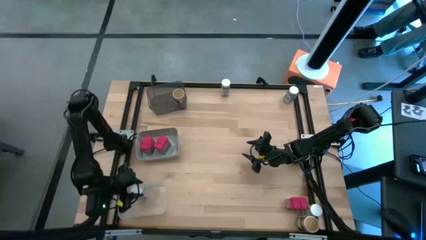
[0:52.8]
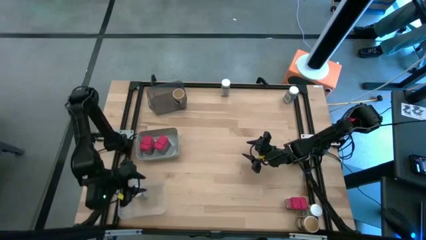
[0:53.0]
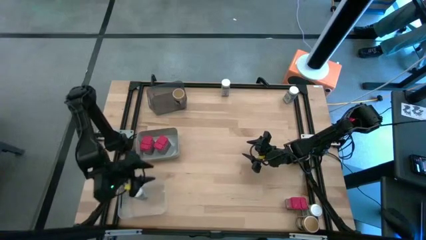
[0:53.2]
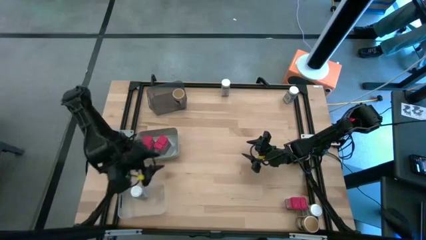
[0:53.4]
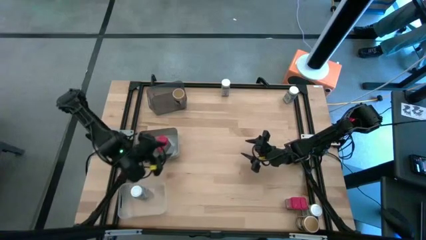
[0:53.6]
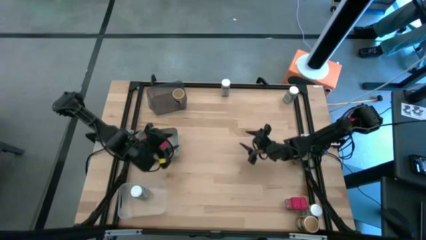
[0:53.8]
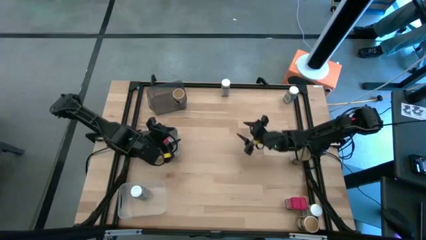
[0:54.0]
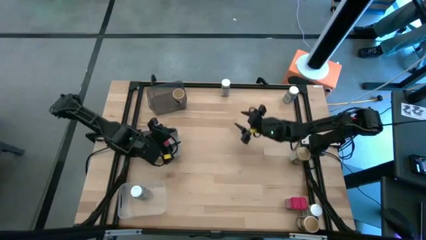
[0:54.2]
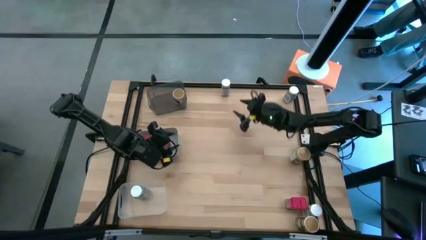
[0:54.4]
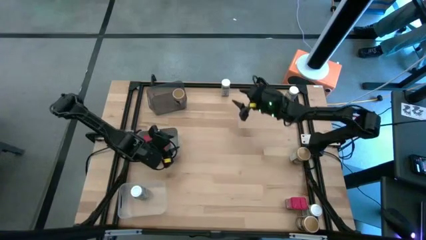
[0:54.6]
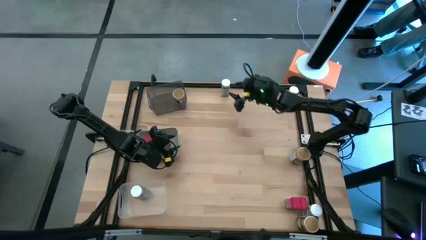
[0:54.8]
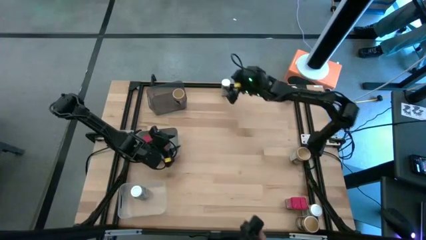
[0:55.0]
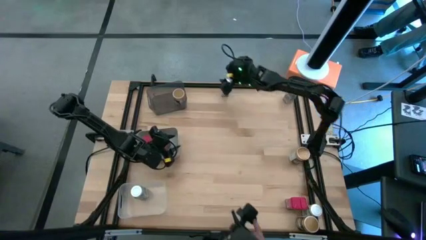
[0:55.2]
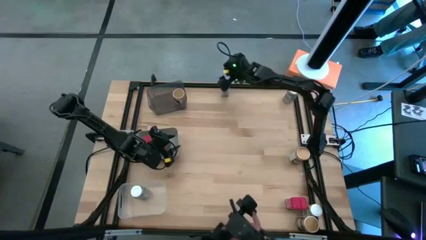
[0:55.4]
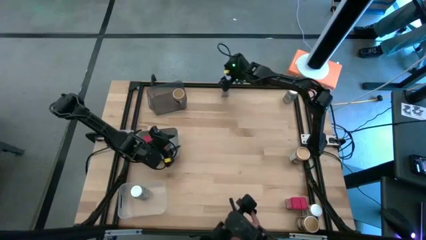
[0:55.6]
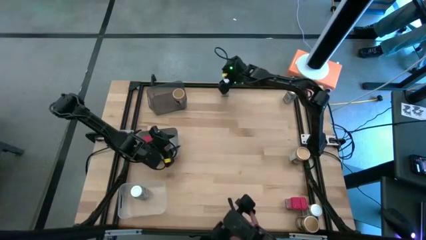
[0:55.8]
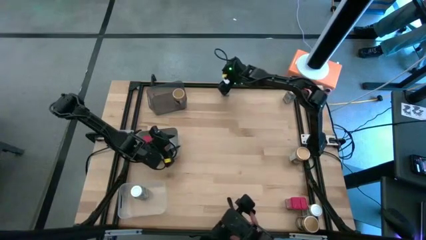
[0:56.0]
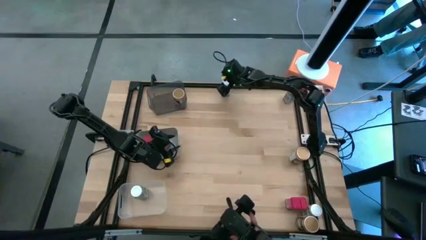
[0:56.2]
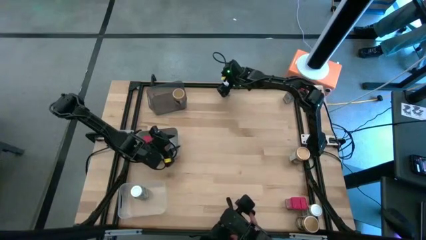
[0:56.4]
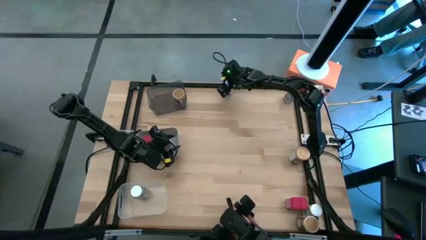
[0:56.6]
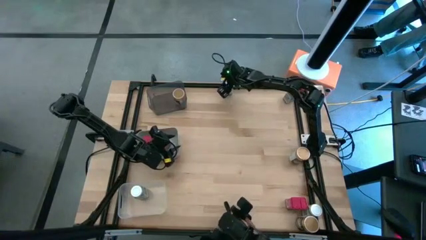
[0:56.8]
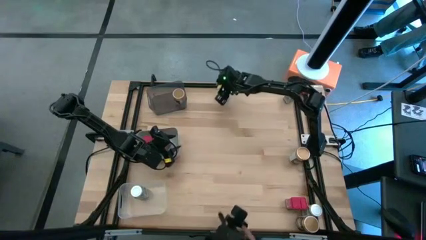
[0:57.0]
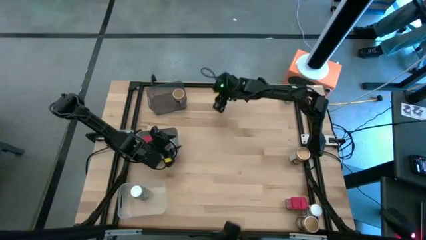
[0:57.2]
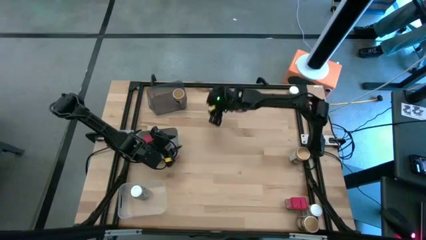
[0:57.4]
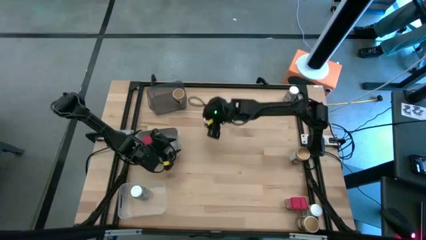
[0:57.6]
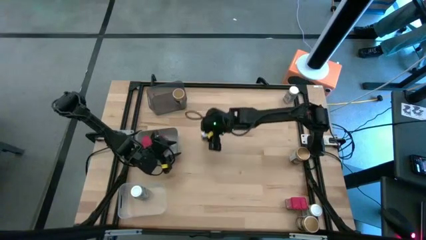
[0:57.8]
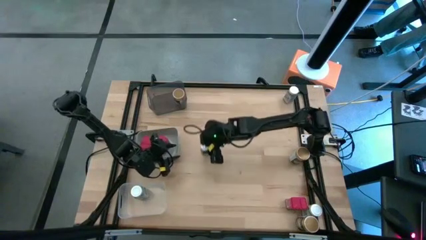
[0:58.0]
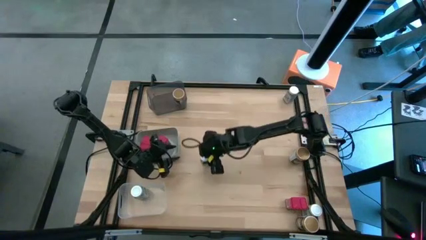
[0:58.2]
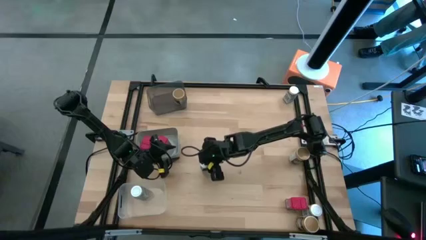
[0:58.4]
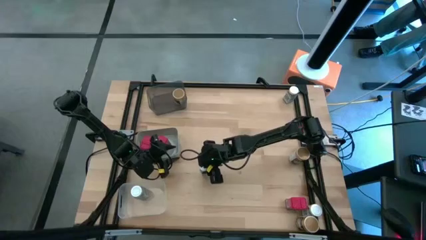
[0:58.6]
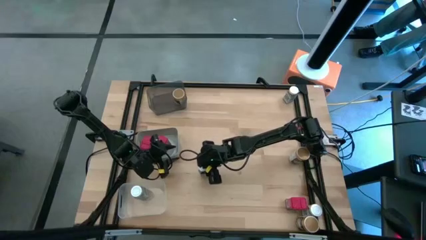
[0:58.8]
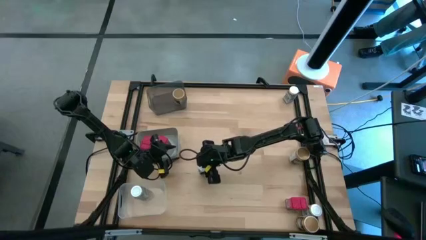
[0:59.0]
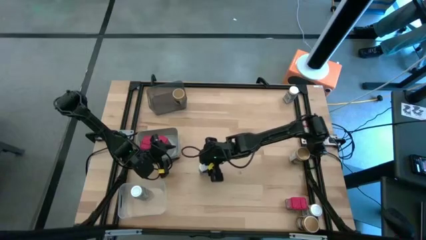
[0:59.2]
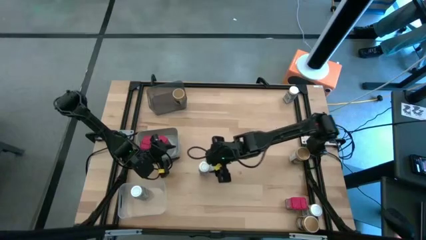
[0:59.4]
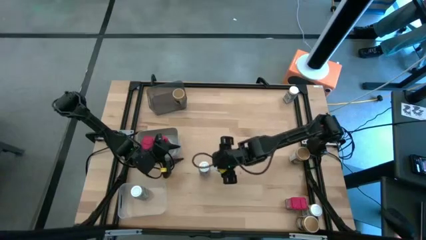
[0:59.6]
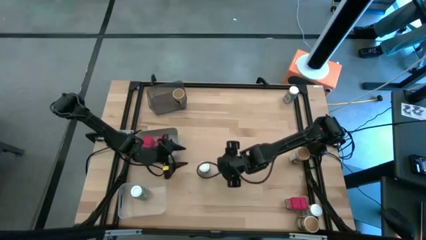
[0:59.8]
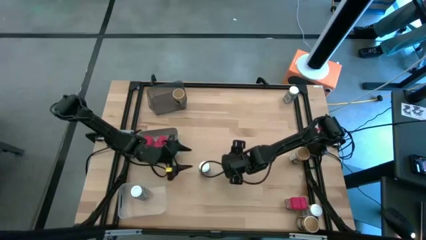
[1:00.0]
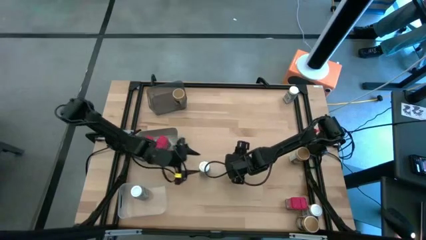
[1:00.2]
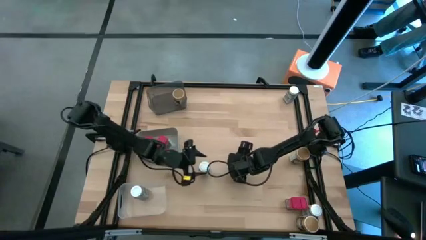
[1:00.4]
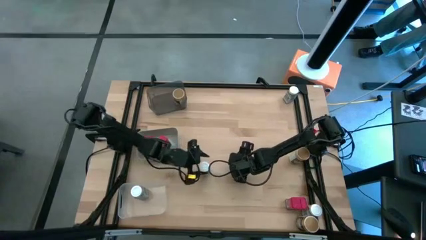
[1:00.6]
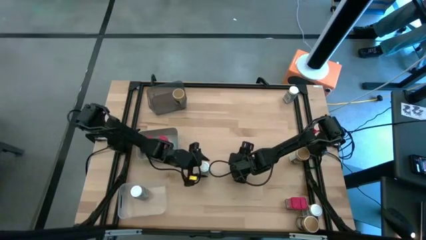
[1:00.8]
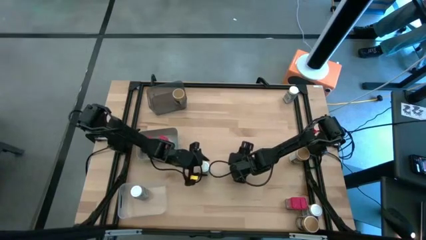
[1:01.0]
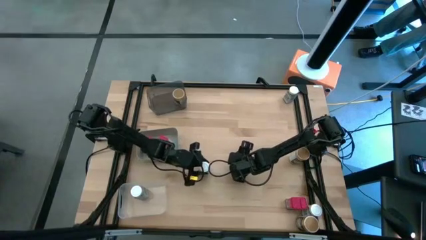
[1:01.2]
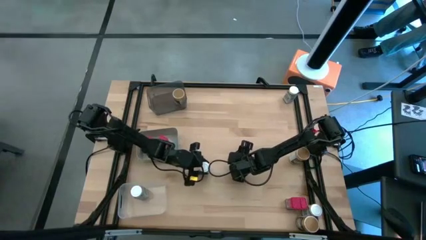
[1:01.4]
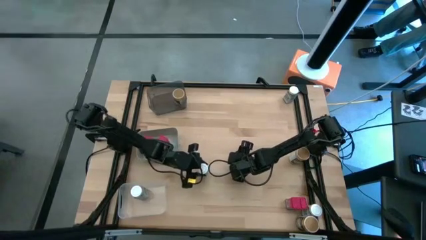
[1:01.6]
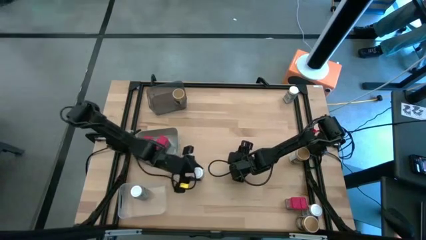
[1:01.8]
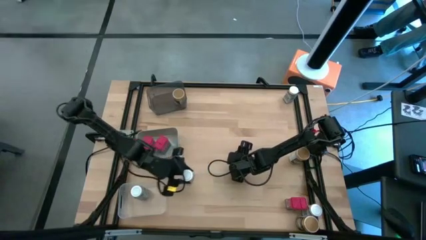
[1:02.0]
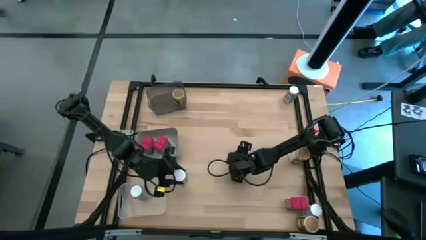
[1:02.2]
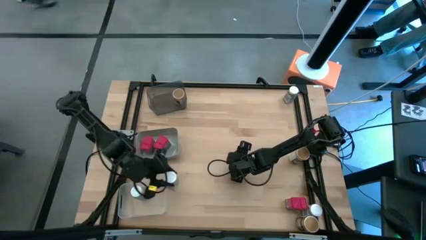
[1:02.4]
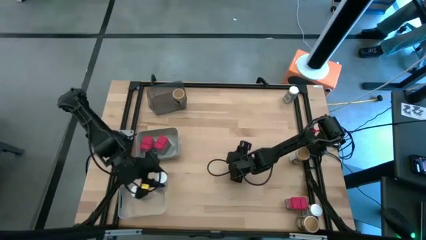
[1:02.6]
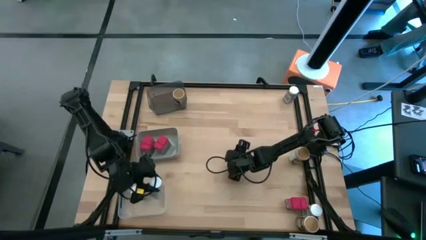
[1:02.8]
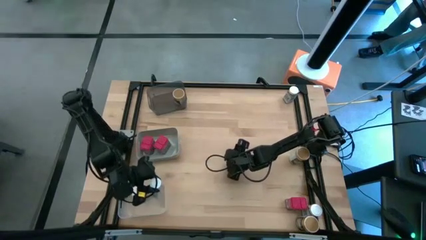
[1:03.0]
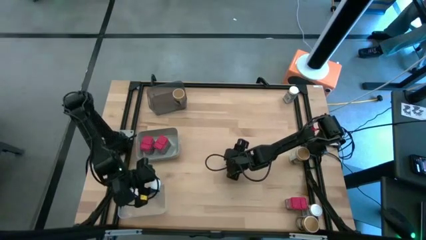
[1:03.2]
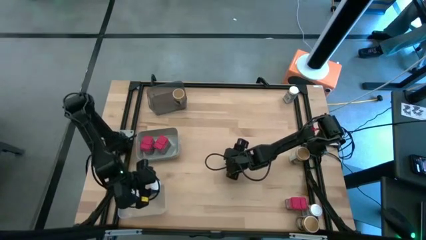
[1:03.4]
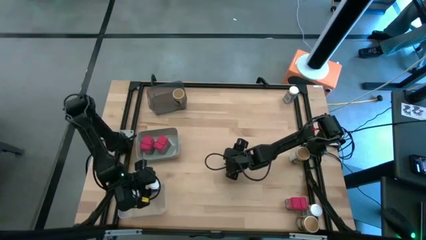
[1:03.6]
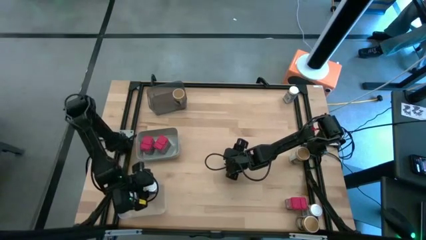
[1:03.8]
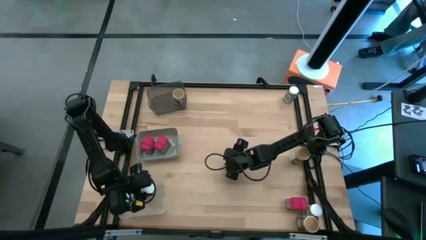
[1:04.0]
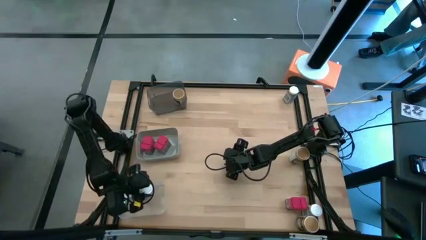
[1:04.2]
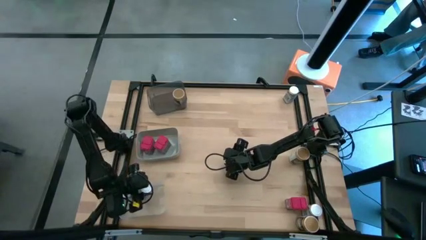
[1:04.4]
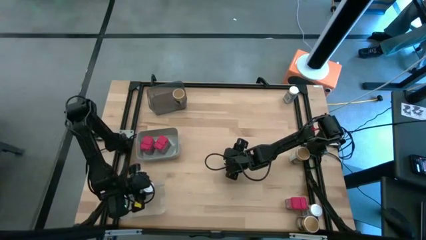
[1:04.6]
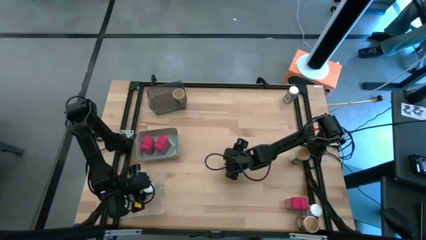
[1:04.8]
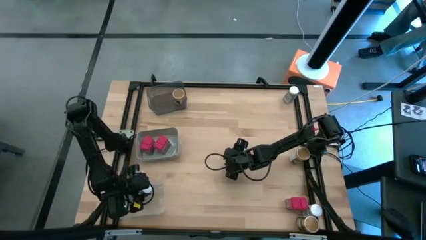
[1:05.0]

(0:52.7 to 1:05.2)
Task: Sort spices by type
Put the top left white seasoning bottle into the transparent bin

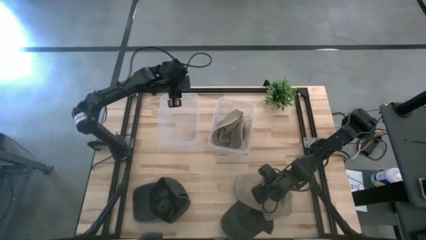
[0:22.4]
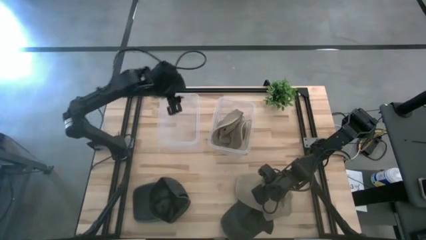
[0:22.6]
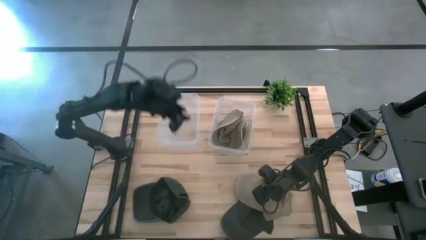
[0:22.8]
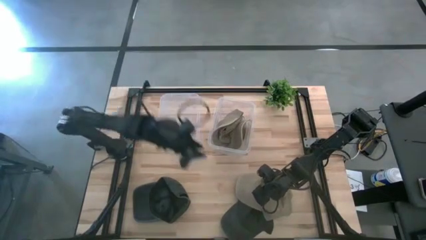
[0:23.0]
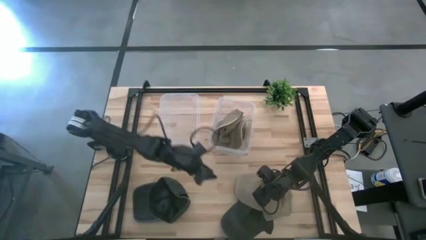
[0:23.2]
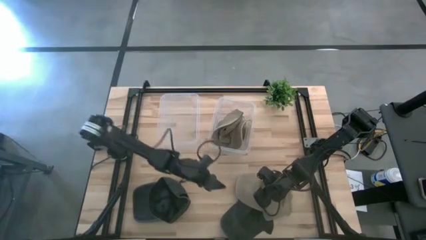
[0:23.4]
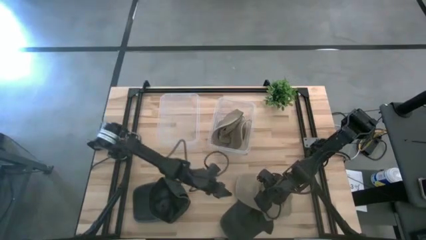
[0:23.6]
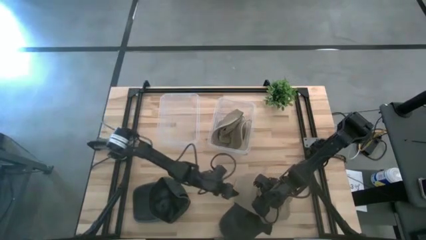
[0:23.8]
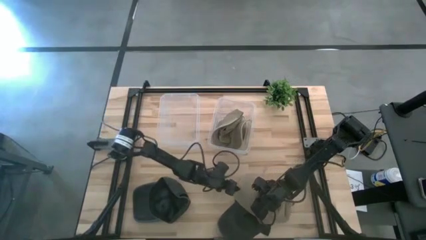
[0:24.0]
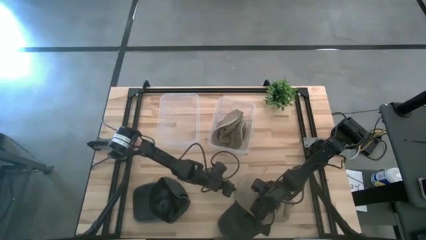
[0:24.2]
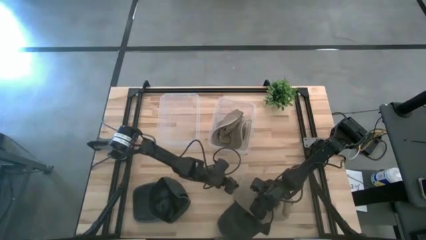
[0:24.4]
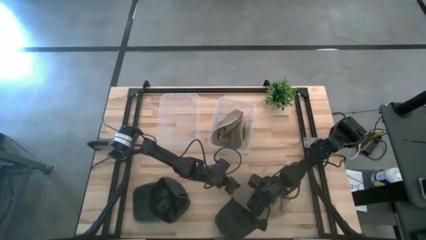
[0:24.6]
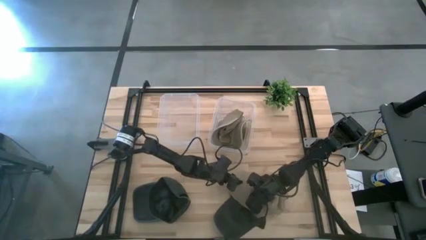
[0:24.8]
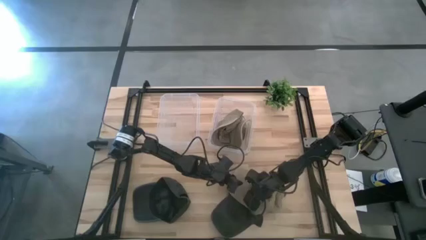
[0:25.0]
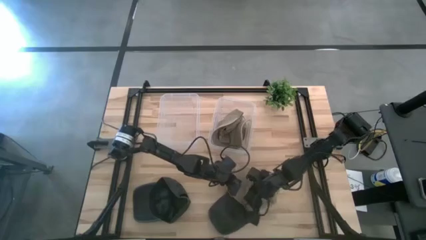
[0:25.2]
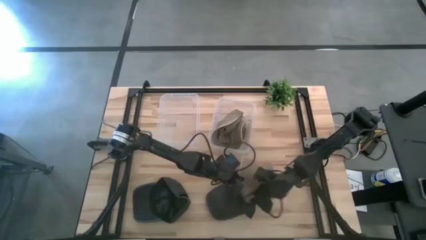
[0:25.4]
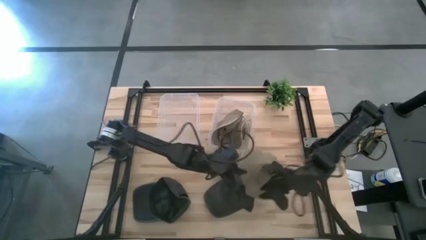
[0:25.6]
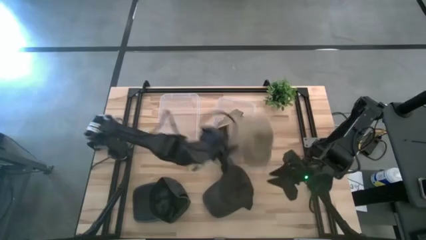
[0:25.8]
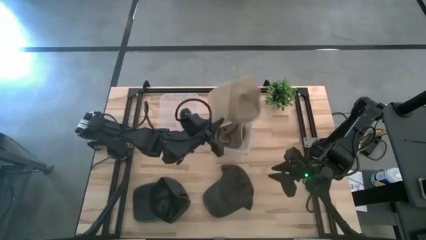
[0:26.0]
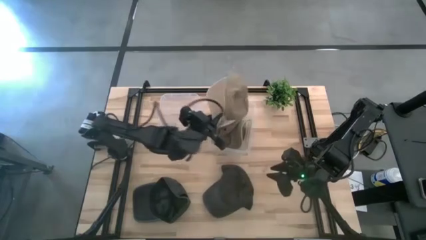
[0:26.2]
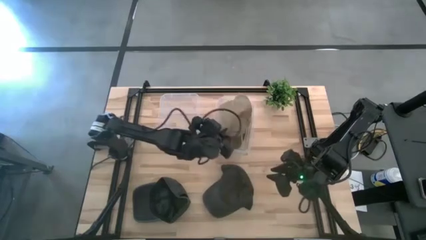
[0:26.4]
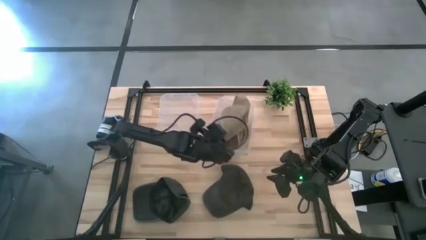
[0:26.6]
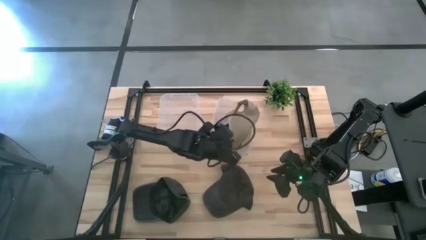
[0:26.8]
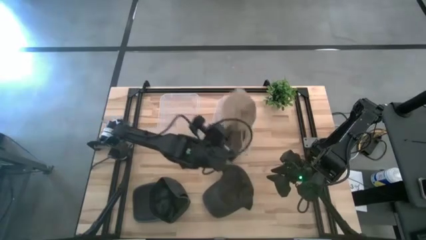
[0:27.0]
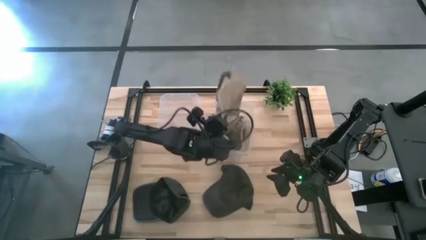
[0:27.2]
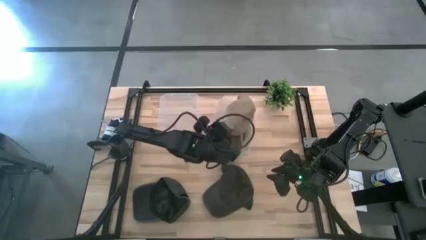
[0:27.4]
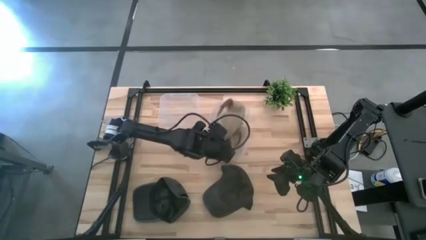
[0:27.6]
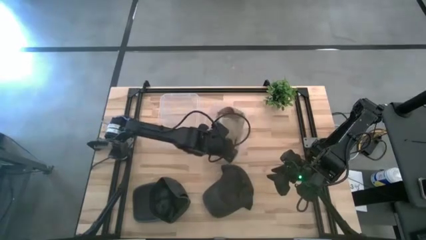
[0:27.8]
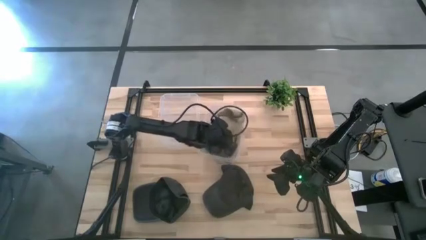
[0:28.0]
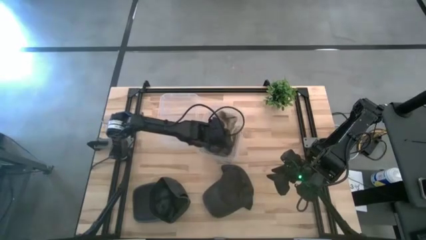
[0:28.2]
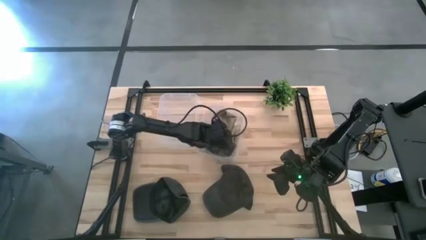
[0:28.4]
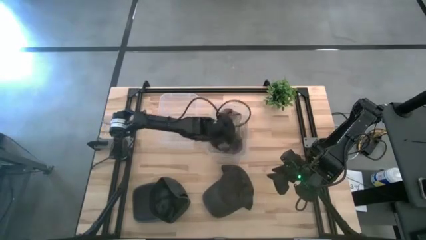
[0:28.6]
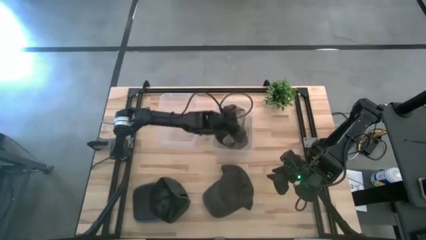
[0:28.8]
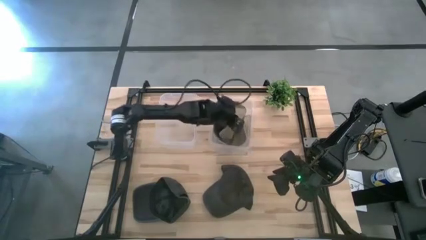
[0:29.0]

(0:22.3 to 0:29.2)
Task: Pick & Place hat
Put the brown cap into the right transparent bin
